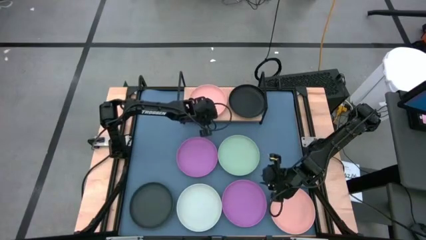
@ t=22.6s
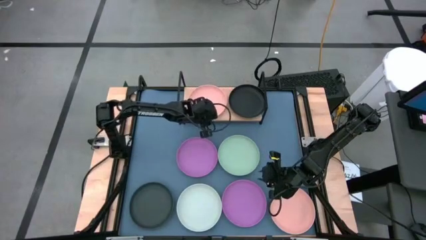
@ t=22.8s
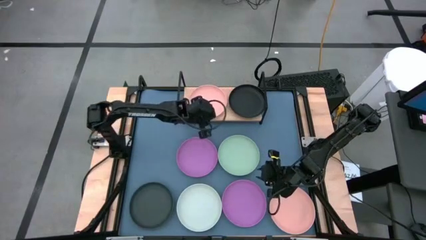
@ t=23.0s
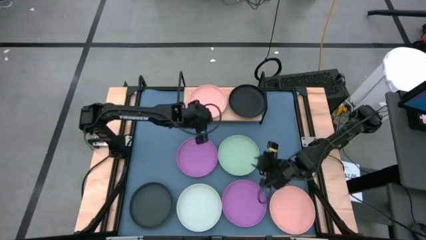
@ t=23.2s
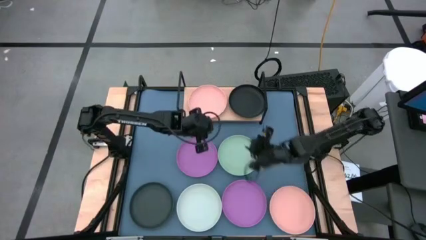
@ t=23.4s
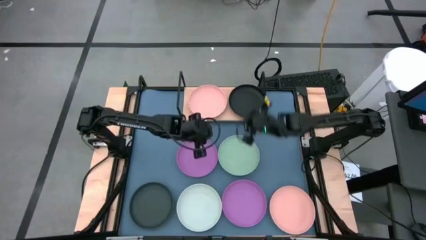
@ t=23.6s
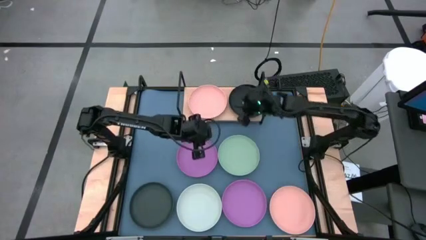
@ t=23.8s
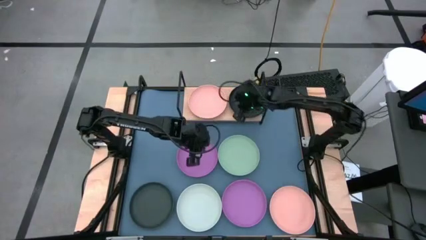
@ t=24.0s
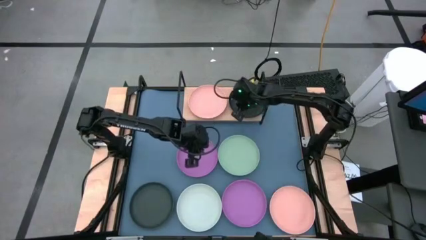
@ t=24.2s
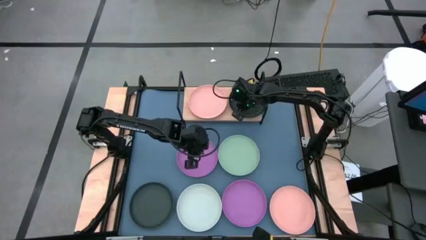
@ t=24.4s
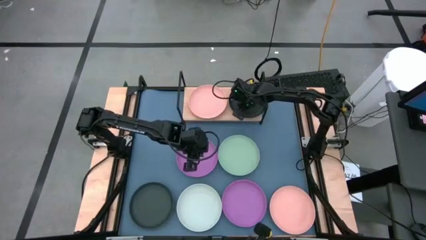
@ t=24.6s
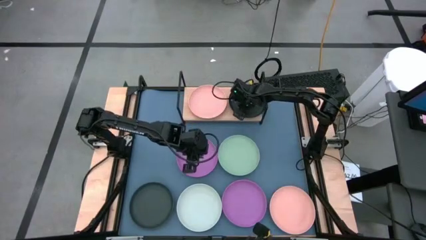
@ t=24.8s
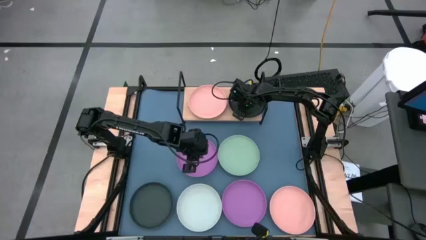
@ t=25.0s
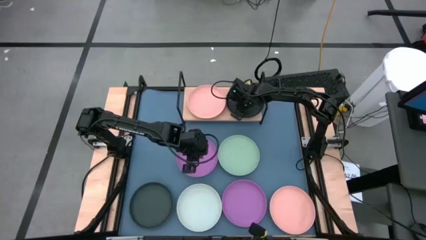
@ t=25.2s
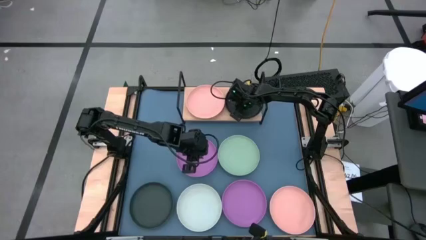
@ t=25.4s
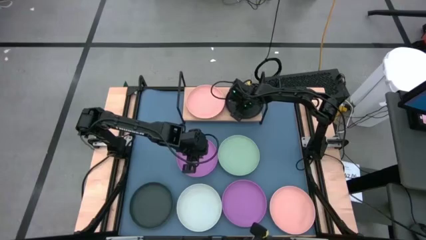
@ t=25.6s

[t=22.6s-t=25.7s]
Task: Place and stack plates onto a shelf
Adjust the black bowl

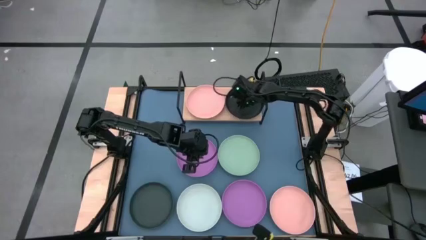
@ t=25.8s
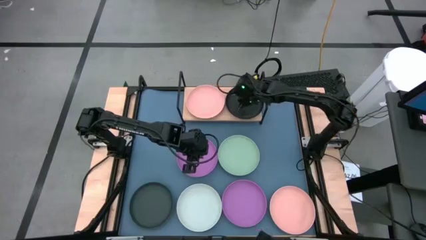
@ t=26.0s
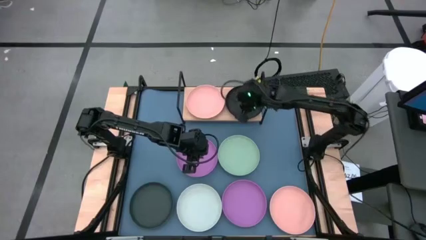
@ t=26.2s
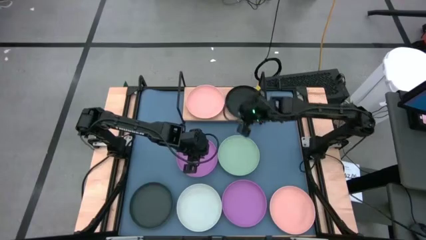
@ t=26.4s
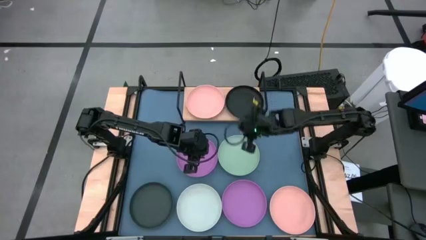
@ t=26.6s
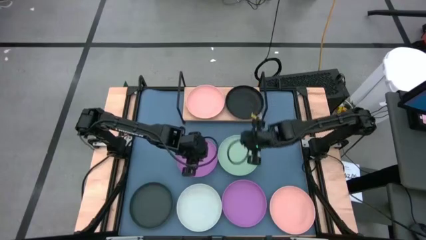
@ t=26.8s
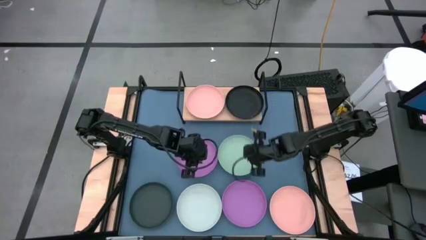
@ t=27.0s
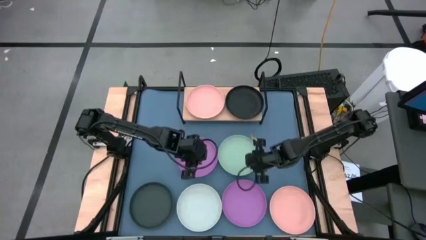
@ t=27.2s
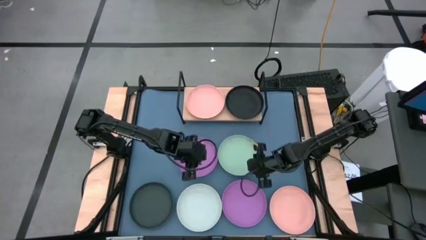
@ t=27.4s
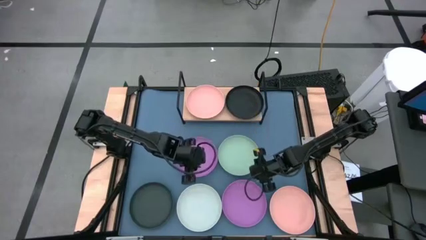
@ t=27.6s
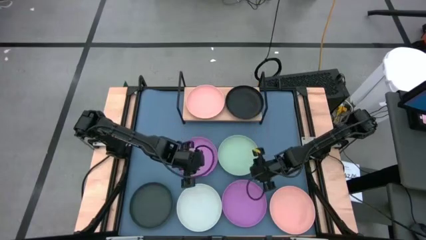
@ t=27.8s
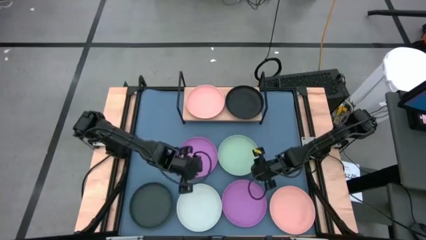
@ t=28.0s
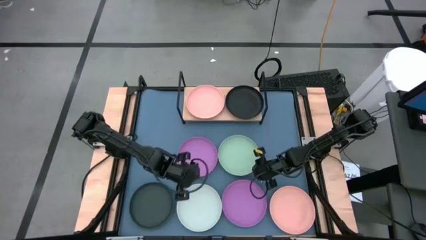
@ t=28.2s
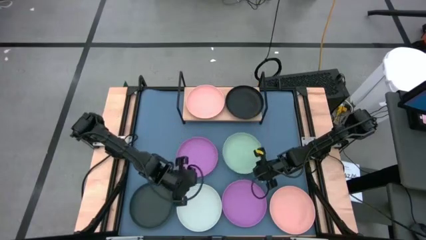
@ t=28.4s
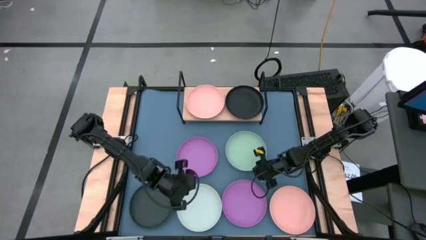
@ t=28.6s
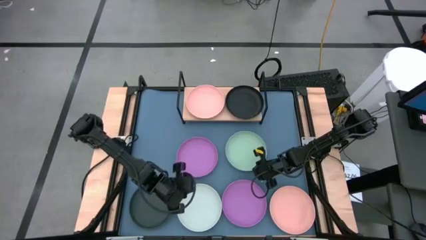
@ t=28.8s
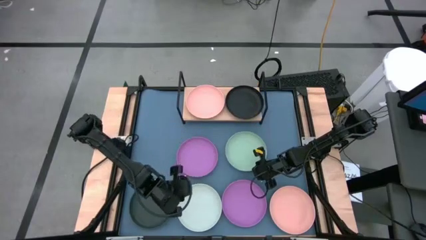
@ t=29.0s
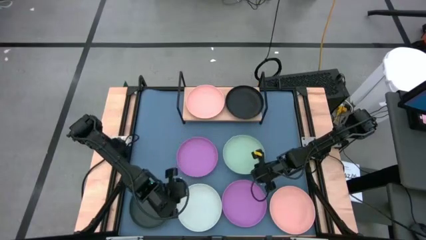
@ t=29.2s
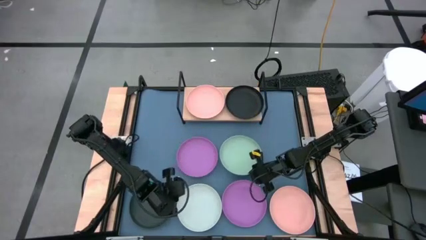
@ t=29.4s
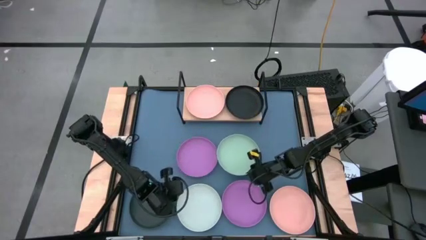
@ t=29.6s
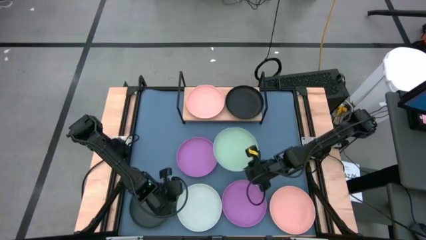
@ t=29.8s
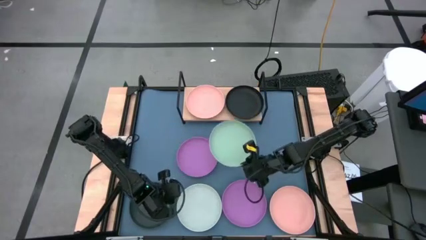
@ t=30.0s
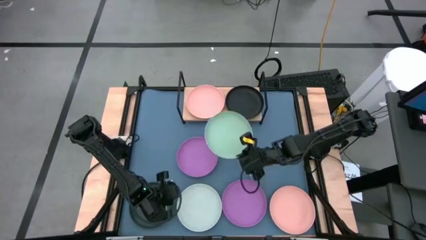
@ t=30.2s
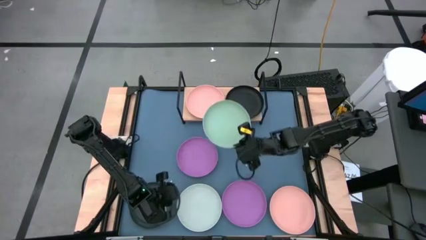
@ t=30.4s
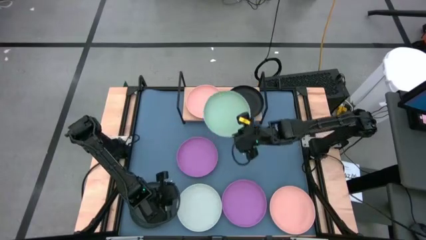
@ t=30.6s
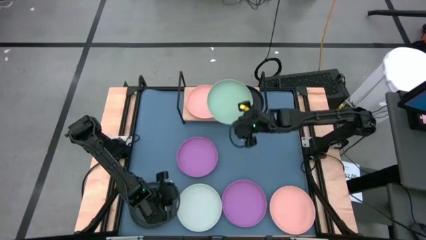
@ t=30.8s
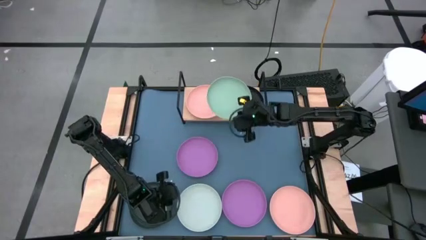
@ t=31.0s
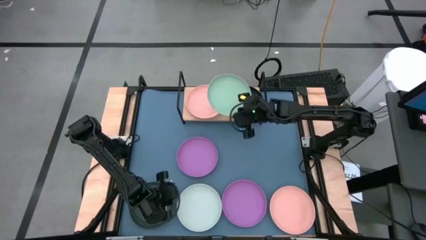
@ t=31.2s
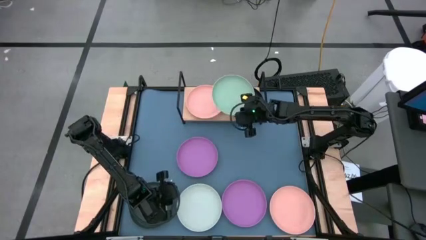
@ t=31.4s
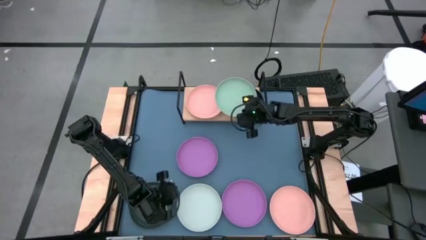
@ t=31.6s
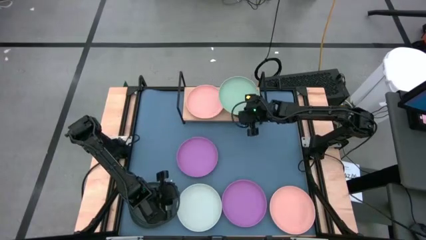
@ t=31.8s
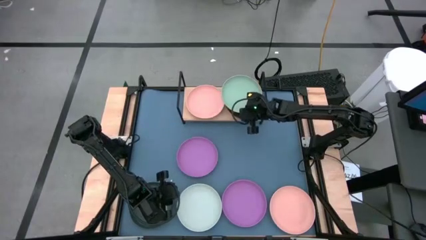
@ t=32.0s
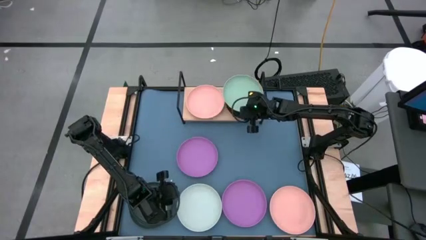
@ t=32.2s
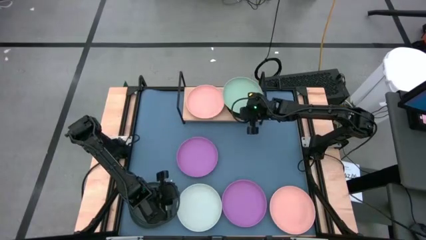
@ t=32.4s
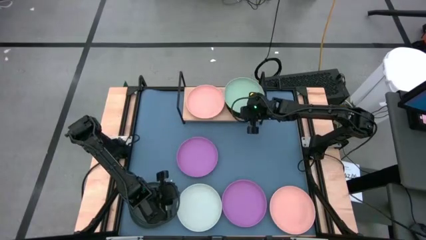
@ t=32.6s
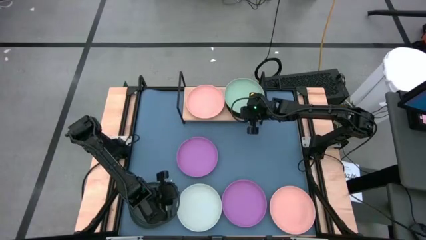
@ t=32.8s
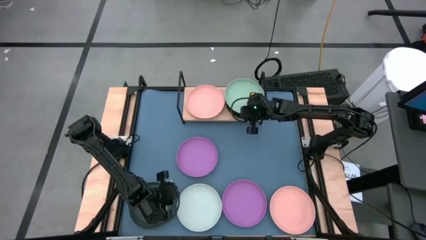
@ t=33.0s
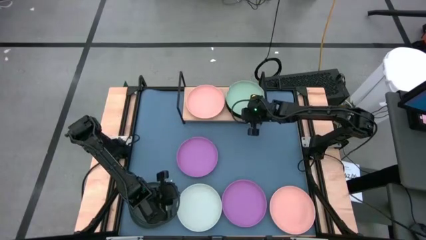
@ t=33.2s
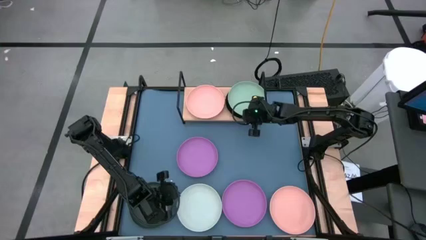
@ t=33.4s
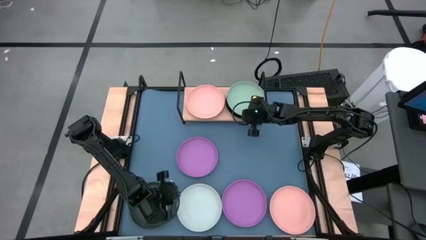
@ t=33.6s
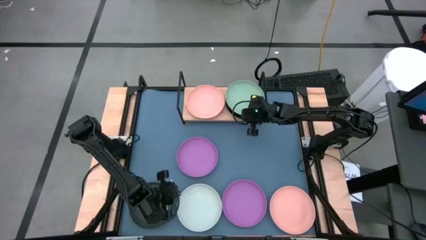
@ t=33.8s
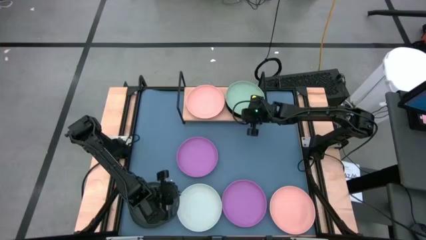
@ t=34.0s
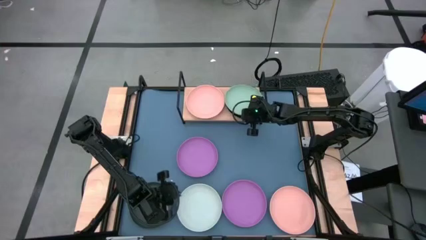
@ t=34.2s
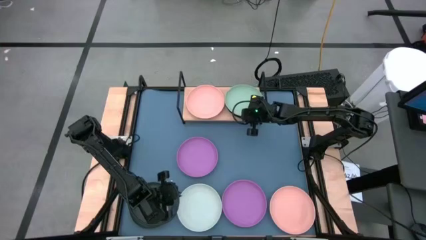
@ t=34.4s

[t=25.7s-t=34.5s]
Stack the green bowl on the black bowl

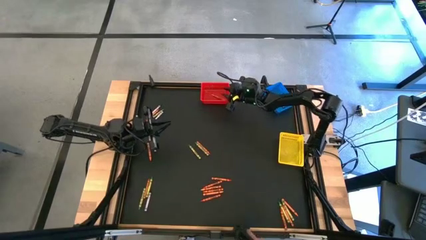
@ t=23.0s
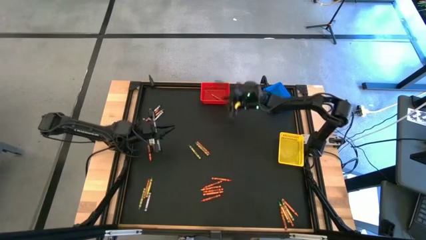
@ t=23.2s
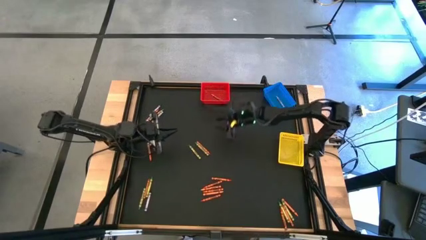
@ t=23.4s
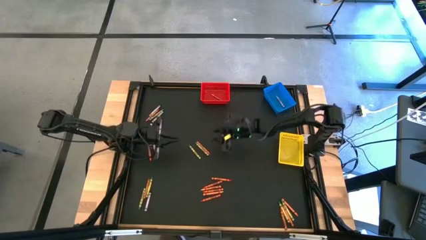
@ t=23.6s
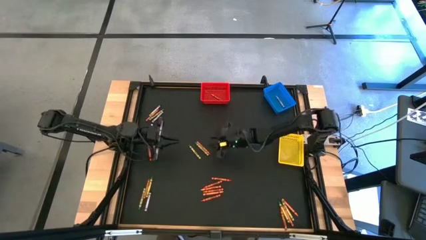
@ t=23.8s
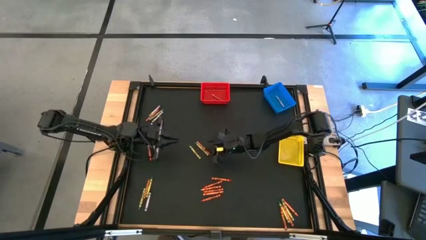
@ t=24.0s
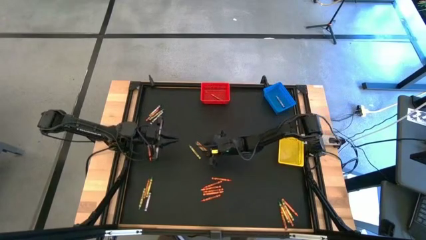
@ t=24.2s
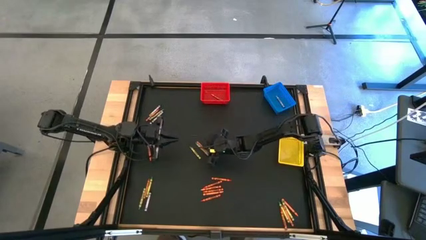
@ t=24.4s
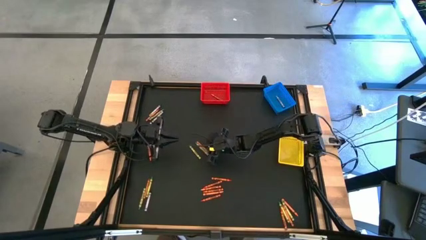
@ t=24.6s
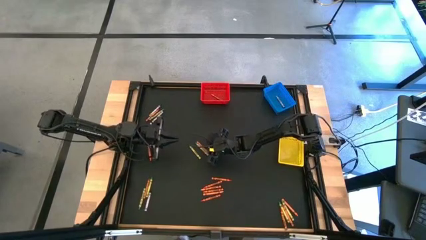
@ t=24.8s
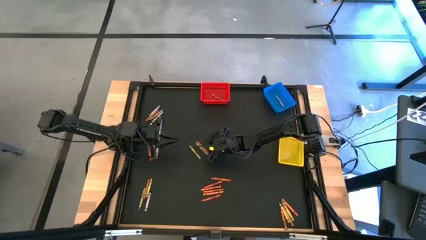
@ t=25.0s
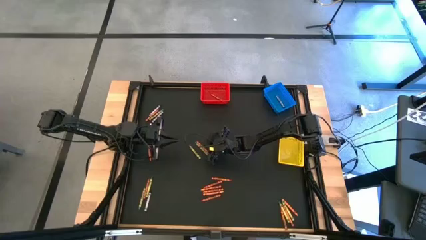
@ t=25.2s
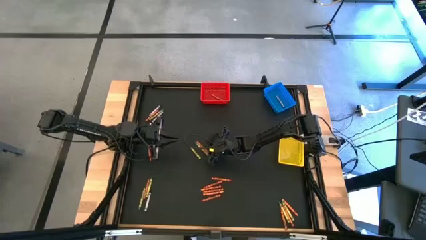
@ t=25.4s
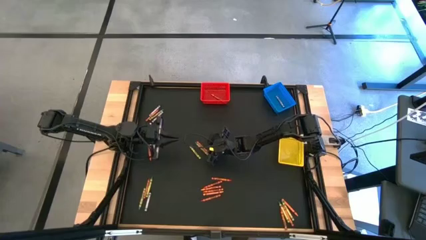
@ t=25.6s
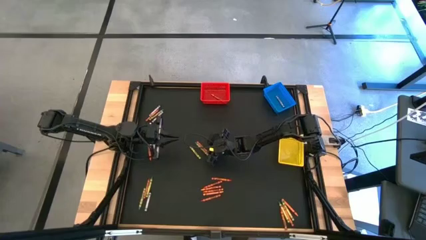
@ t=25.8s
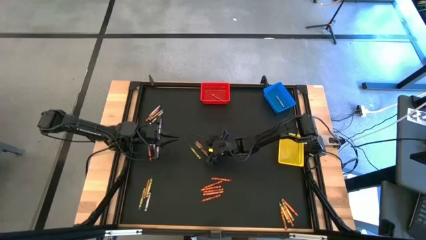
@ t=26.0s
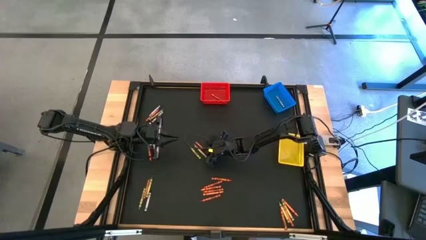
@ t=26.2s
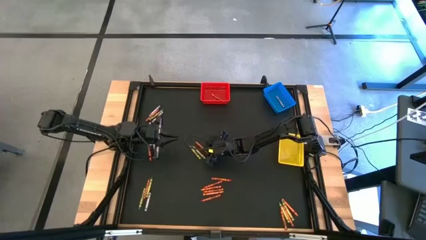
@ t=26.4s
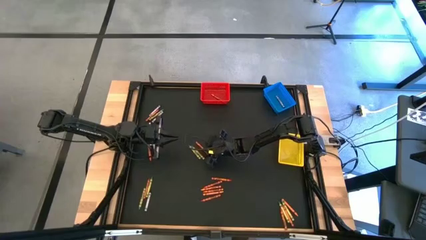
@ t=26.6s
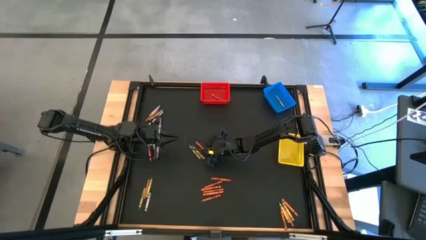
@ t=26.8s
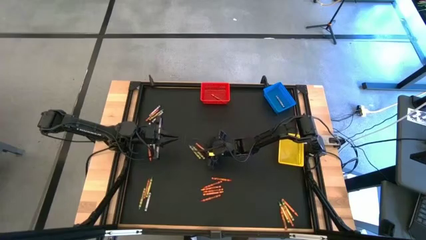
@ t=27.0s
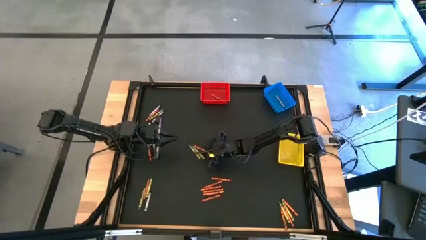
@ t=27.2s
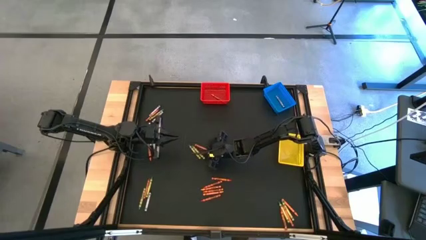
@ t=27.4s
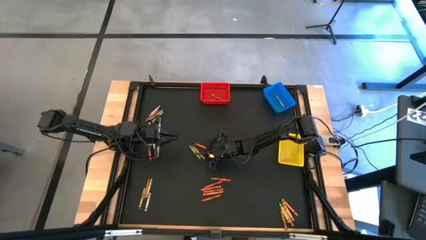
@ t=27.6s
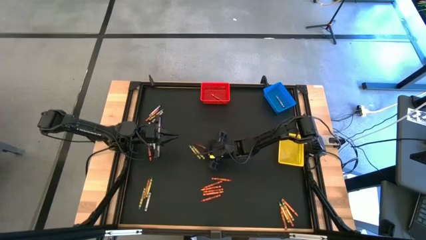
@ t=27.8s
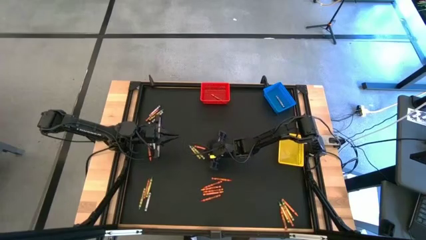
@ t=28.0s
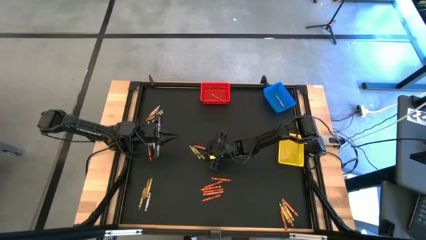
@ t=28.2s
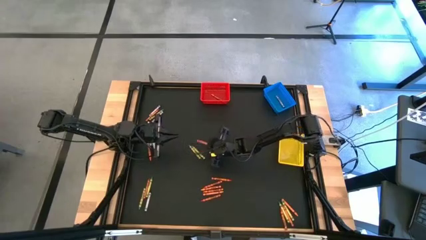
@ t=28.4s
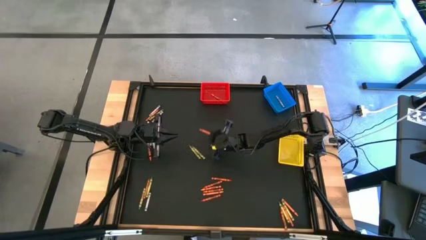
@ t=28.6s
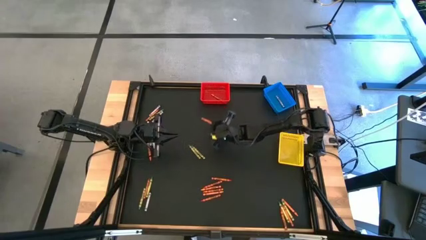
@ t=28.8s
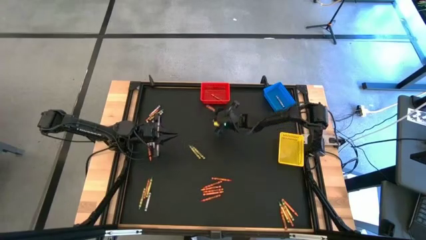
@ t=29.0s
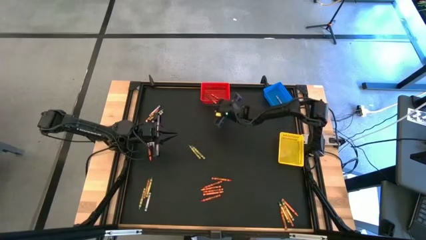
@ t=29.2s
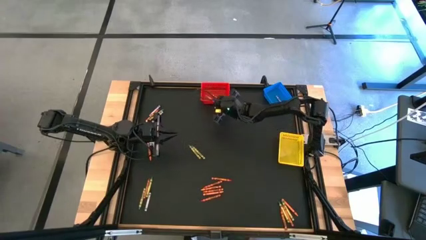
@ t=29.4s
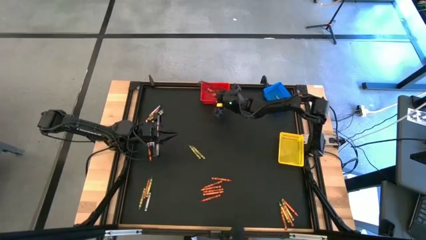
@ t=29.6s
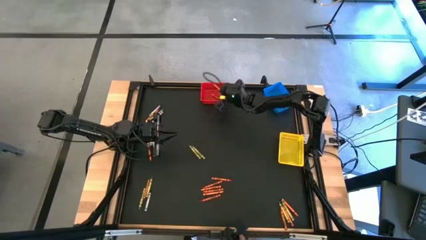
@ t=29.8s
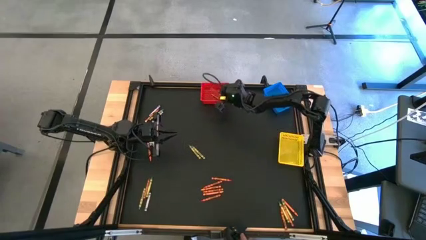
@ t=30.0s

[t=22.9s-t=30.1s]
Task: Sort crayons
Put the orange crayon into the red bin
